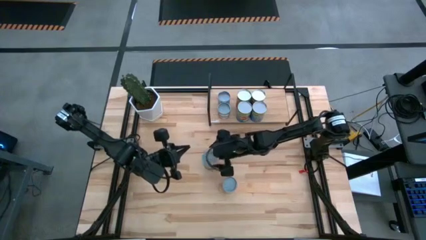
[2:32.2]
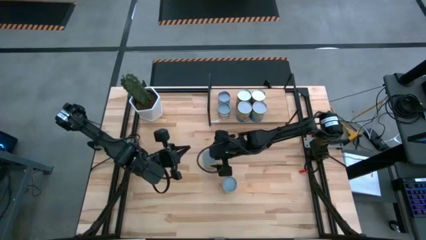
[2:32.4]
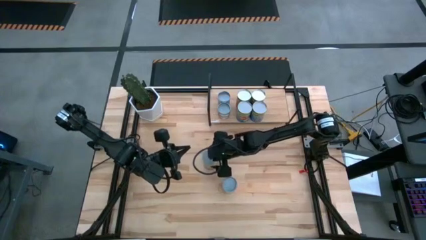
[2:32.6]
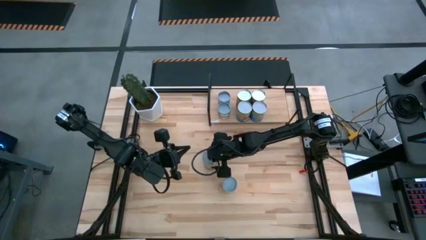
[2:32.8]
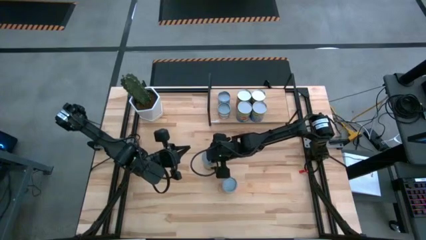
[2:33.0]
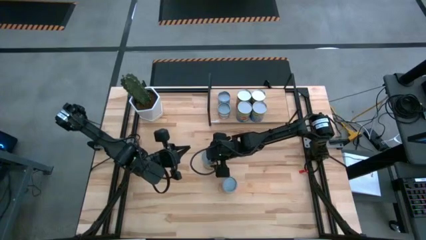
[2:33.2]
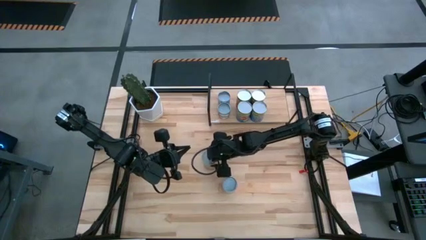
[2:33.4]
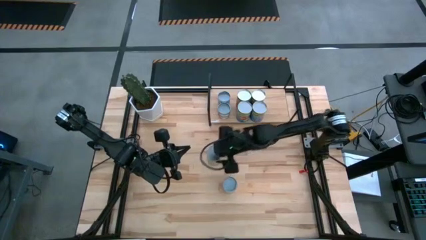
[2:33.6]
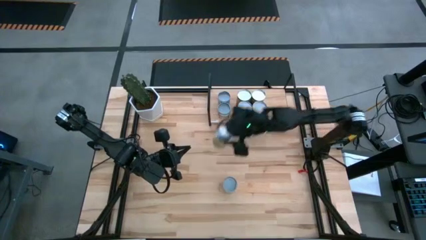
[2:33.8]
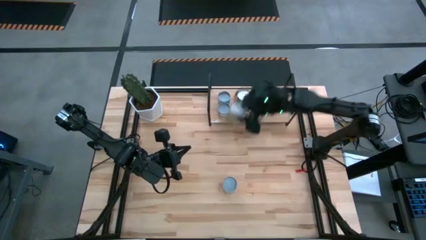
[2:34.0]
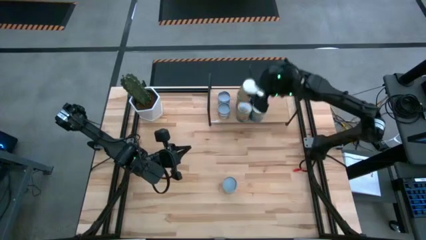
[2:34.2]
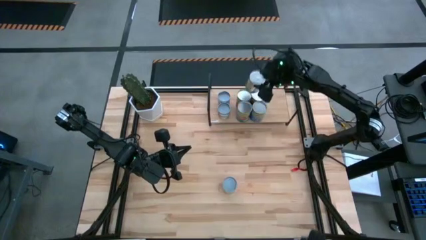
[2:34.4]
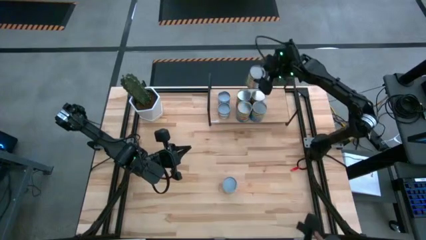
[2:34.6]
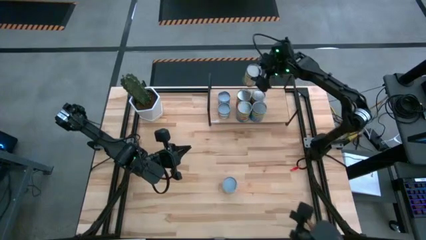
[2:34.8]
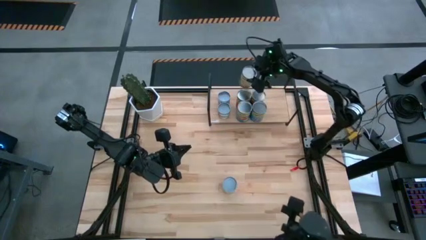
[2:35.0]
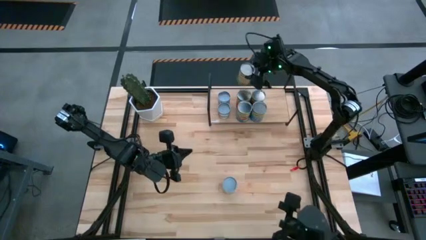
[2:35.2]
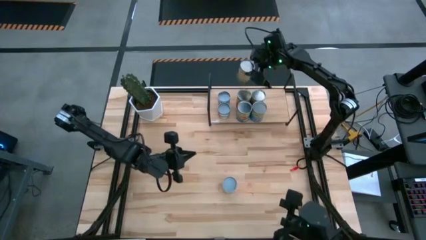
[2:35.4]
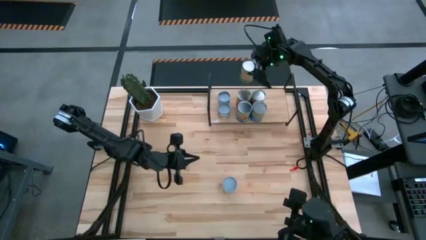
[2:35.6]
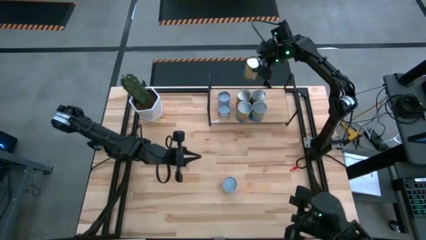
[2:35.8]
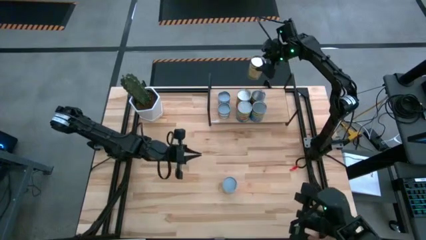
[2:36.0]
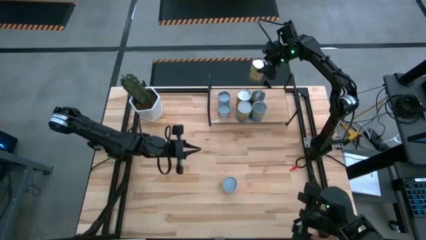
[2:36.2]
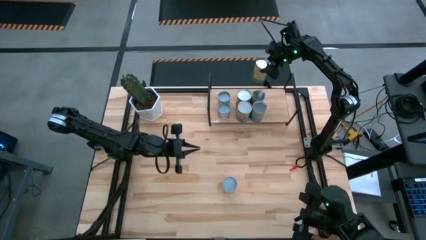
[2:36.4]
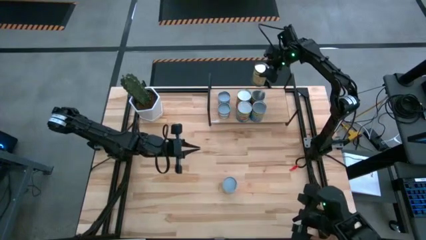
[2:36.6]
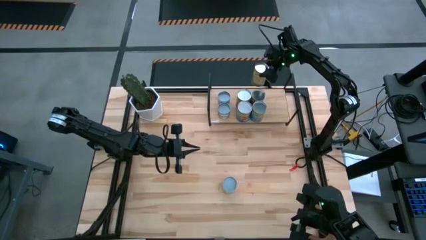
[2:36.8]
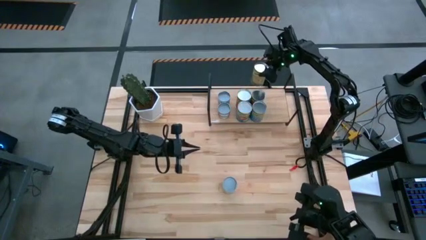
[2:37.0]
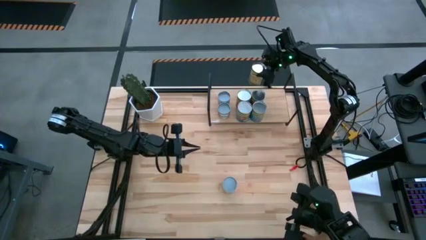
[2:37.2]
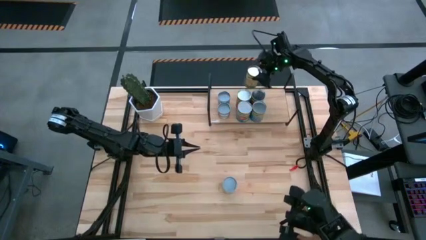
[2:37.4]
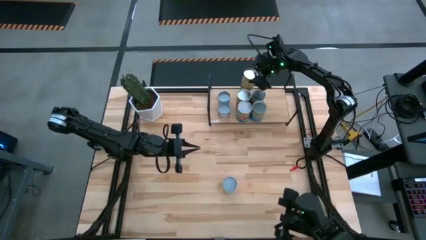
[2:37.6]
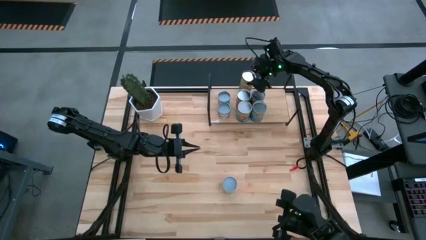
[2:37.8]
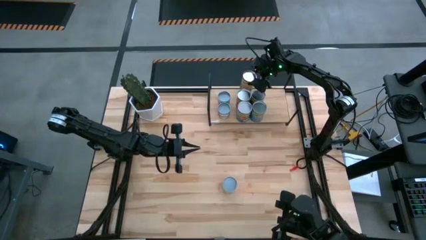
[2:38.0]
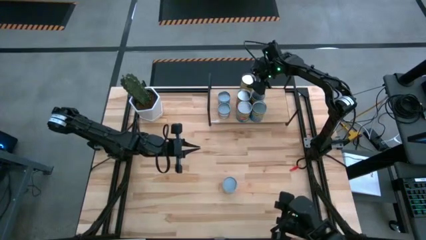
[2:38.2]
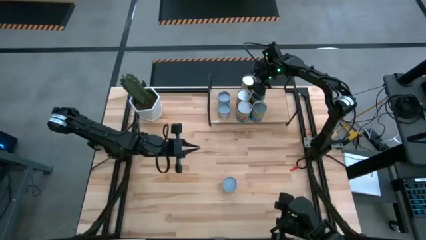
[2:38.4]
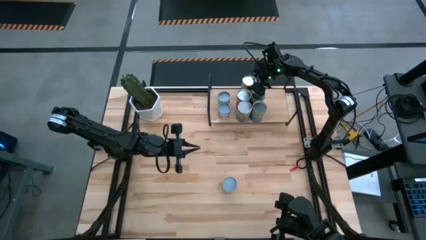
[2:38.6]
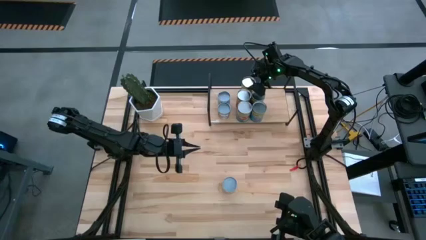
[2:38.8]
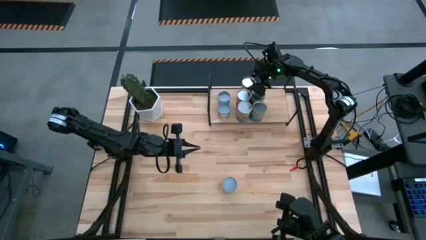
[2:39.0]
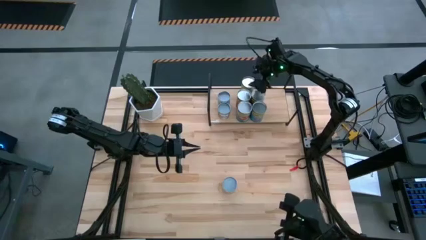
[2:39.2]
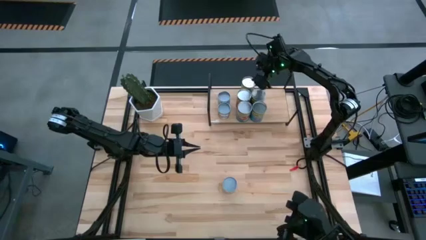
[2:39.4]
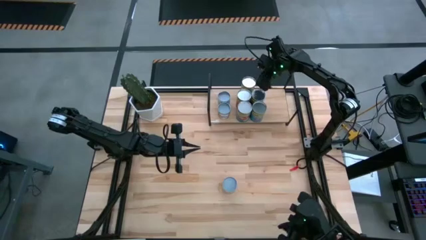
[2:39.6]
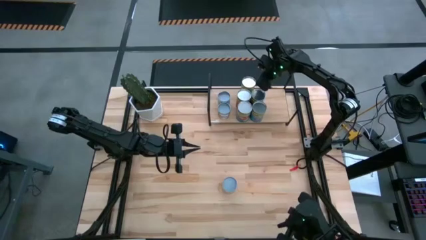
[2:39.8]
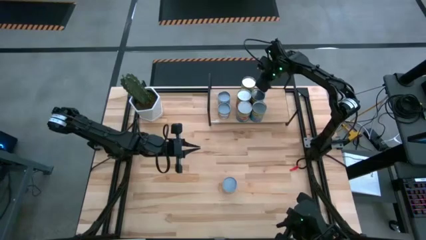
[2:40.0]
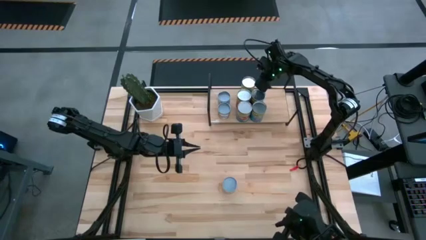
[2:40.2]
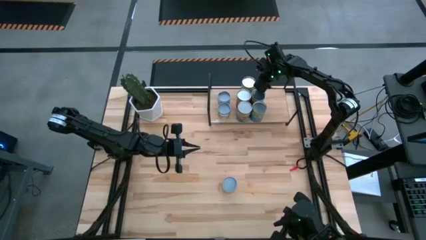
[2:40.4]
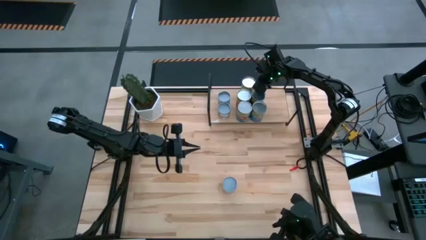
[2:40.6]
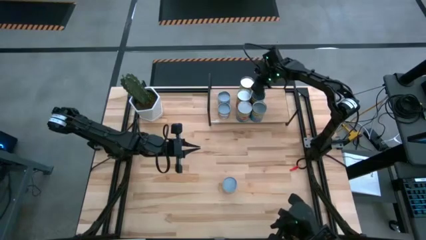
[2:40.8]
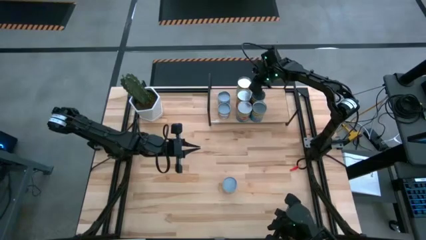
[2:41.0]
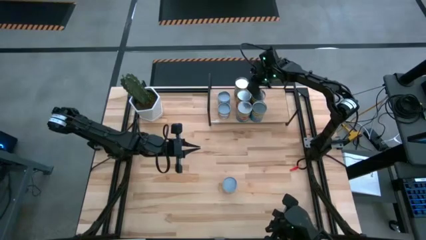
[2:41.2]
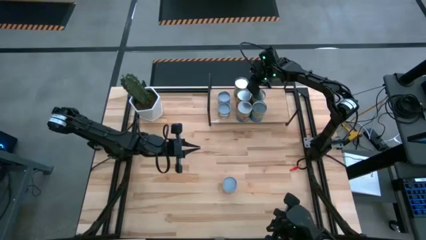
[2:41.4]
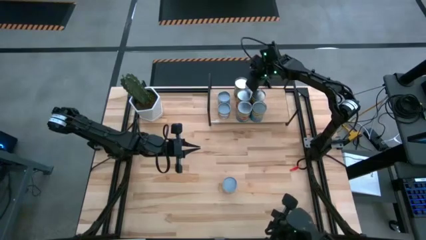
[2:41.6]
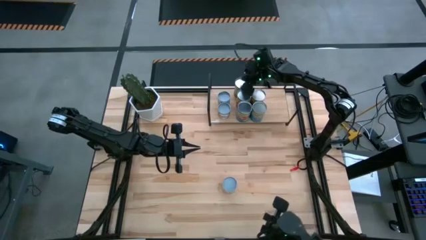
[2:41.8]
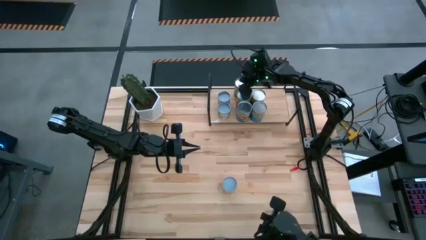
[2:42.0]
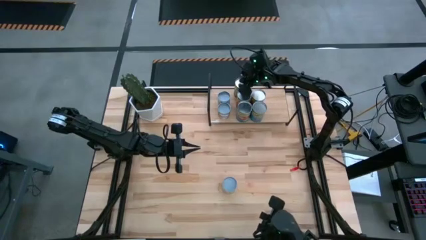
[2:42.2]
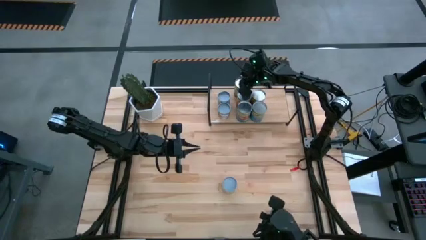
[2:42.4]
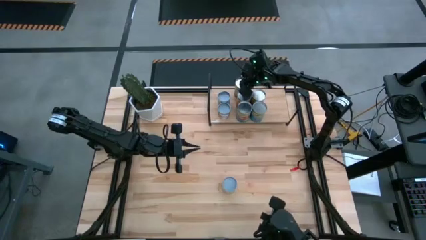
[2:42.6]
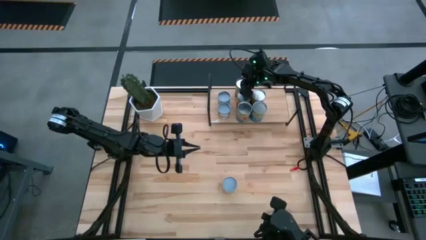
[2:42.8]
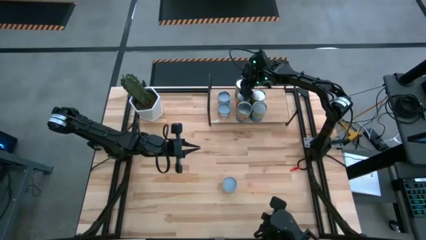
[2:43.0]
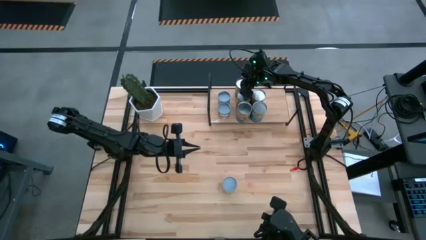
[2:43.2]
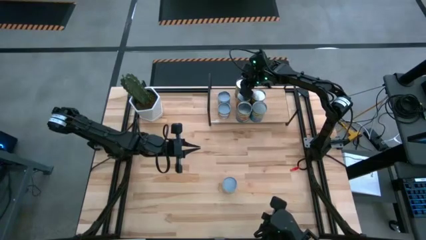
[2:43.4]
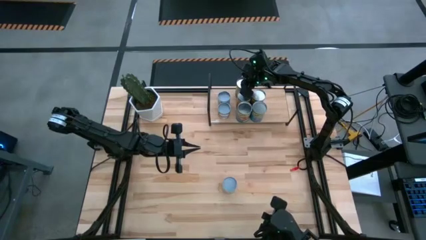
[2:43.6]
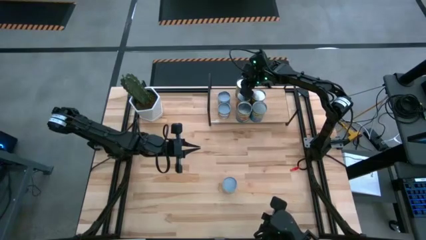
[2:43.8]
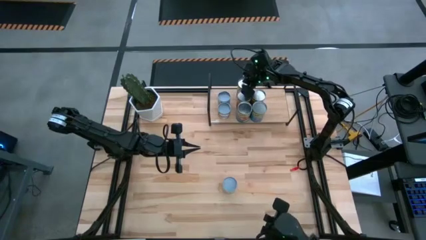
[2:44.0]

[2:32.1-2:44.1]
Task: Pick and place cans onto a shelf
Put the canned oranges on the shelf
